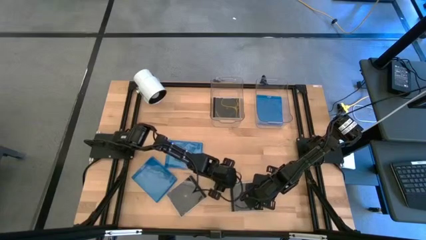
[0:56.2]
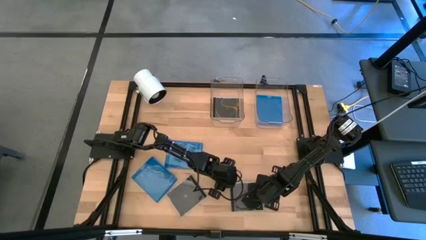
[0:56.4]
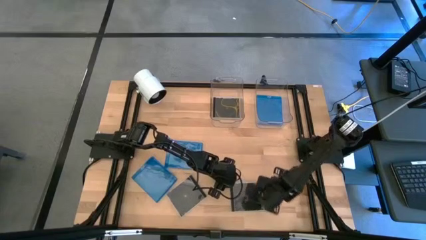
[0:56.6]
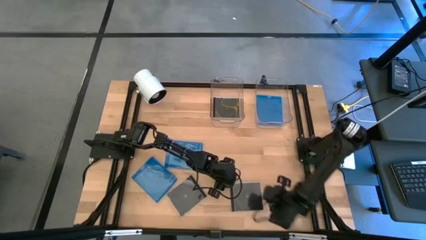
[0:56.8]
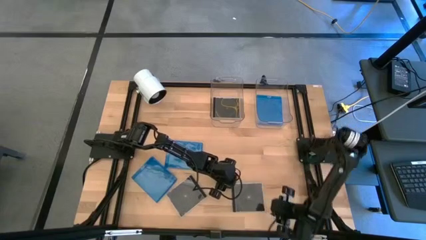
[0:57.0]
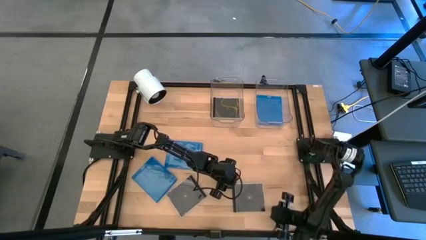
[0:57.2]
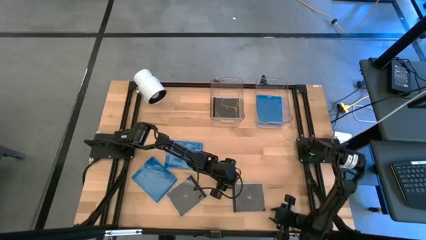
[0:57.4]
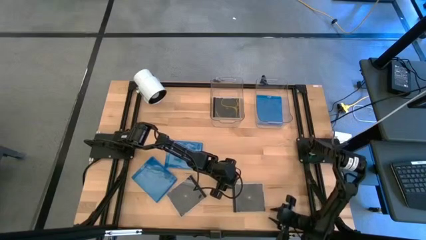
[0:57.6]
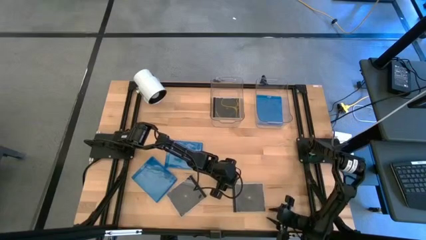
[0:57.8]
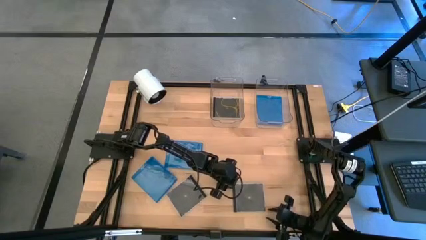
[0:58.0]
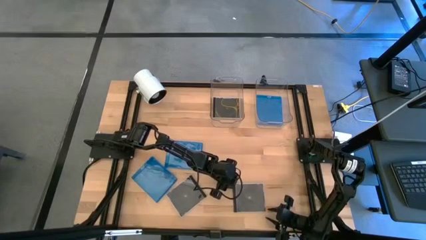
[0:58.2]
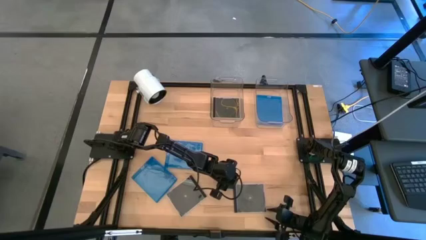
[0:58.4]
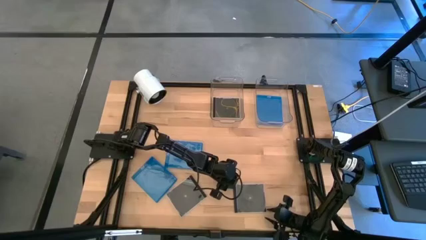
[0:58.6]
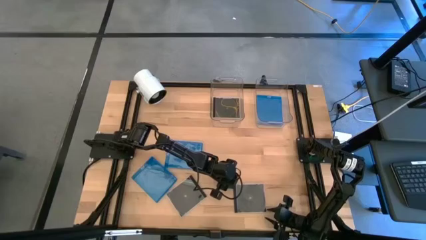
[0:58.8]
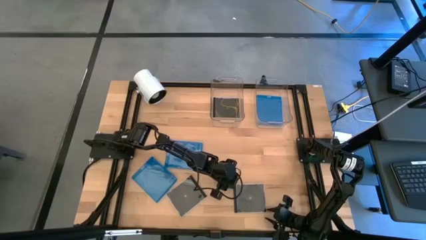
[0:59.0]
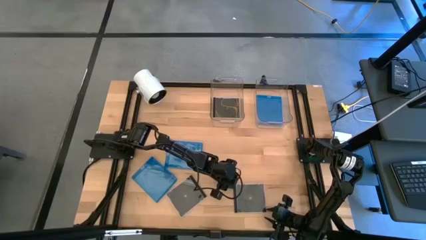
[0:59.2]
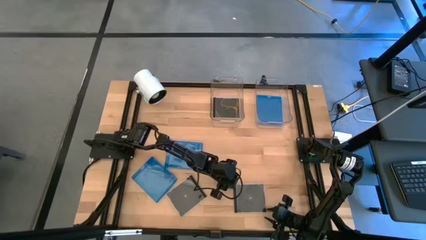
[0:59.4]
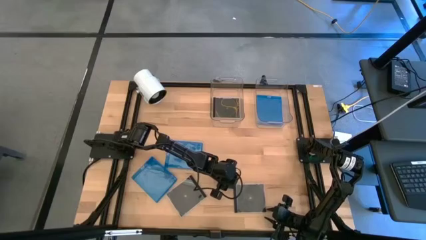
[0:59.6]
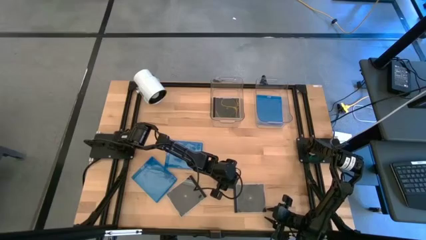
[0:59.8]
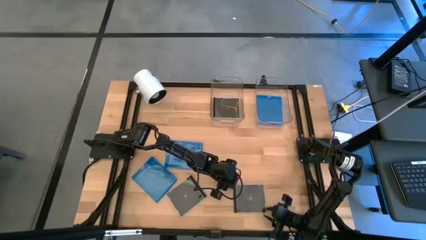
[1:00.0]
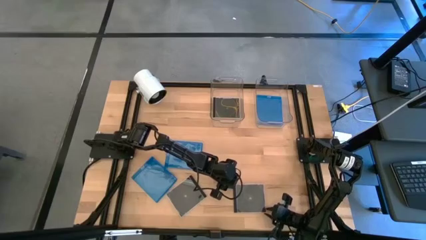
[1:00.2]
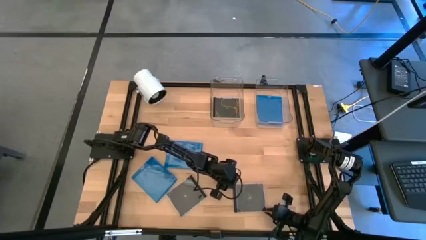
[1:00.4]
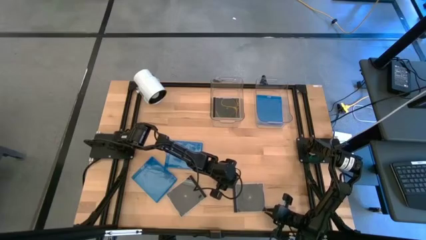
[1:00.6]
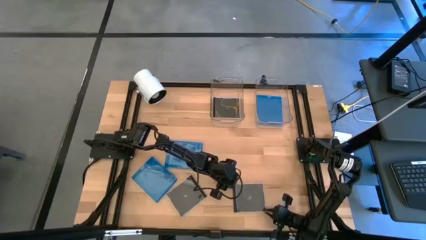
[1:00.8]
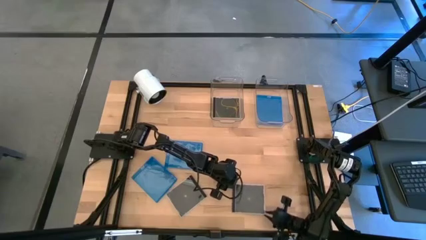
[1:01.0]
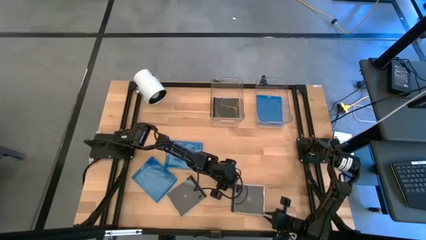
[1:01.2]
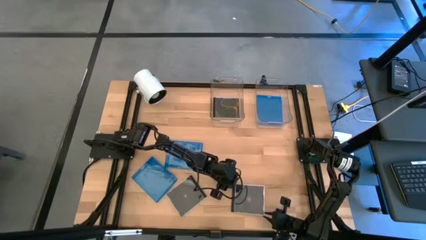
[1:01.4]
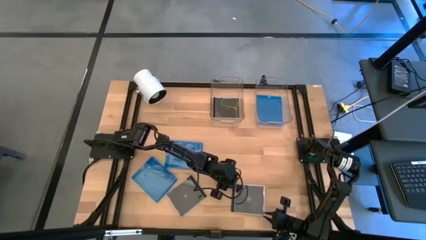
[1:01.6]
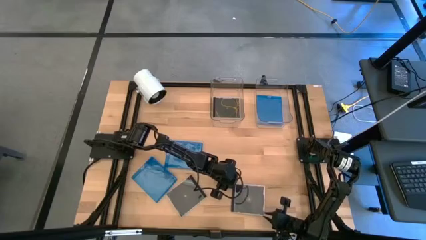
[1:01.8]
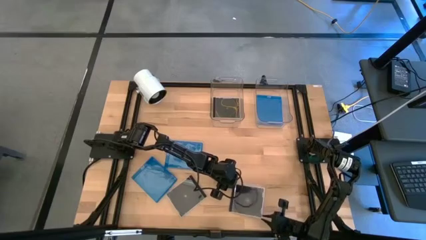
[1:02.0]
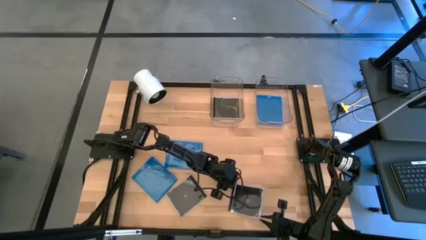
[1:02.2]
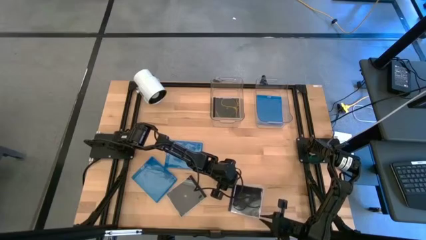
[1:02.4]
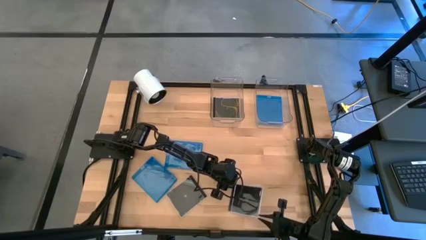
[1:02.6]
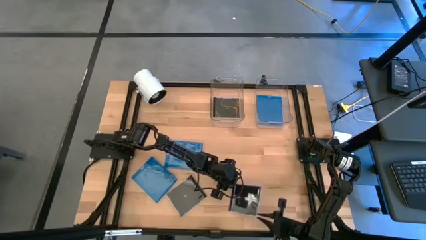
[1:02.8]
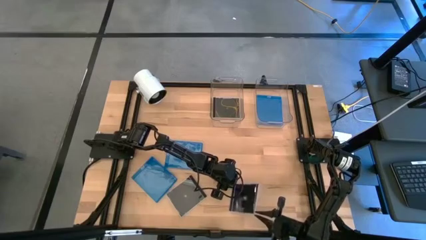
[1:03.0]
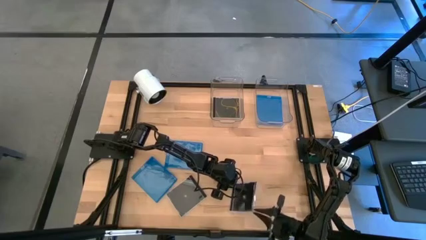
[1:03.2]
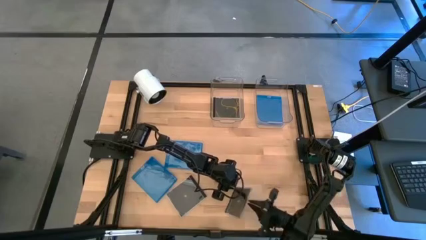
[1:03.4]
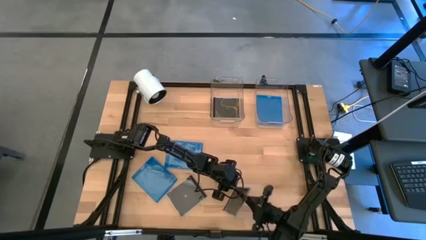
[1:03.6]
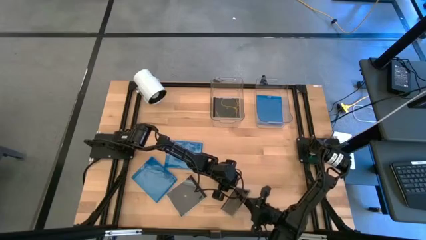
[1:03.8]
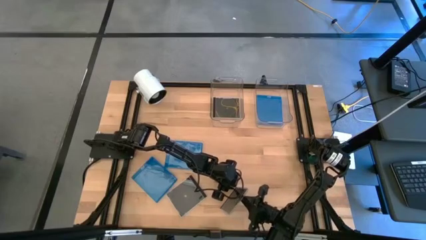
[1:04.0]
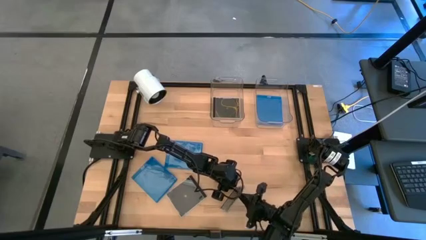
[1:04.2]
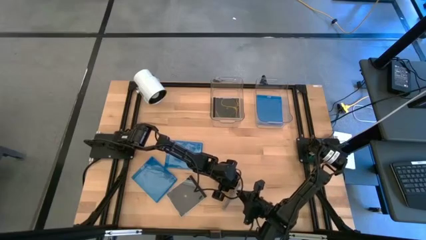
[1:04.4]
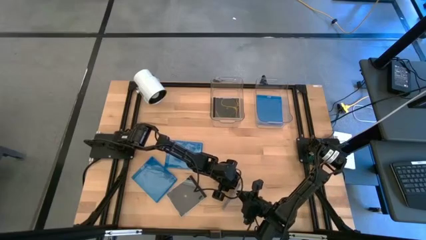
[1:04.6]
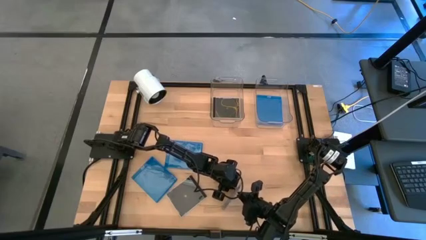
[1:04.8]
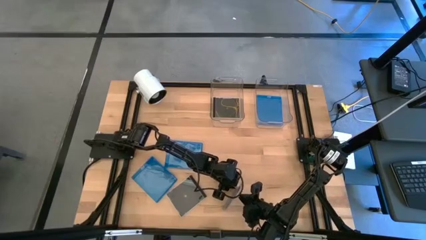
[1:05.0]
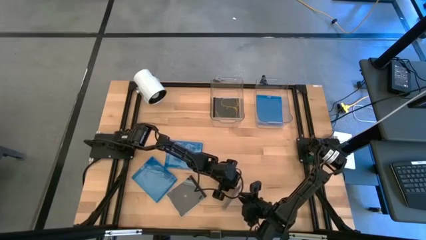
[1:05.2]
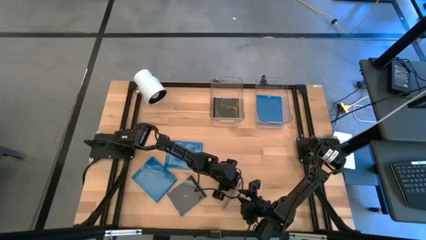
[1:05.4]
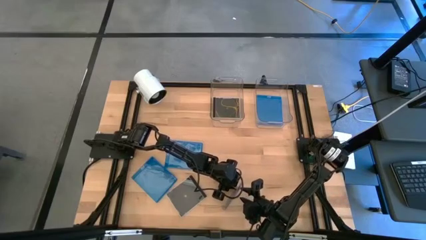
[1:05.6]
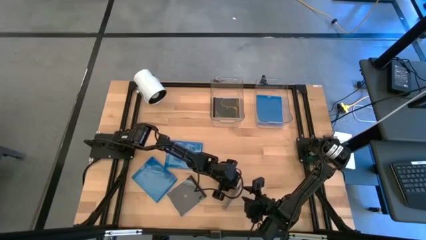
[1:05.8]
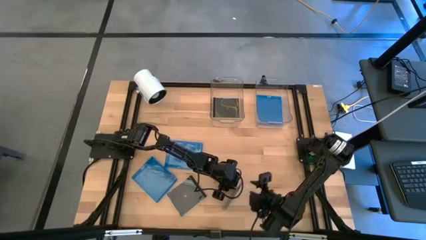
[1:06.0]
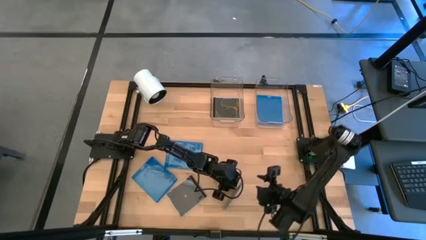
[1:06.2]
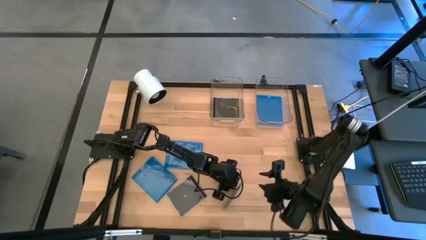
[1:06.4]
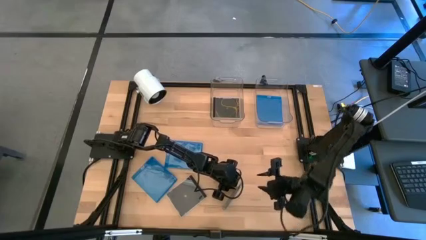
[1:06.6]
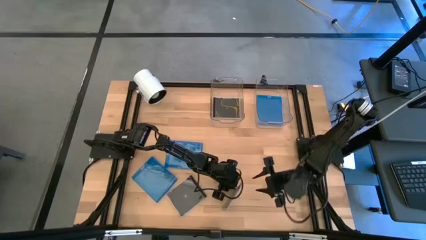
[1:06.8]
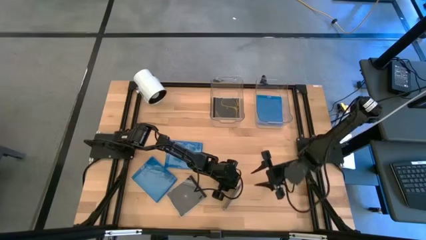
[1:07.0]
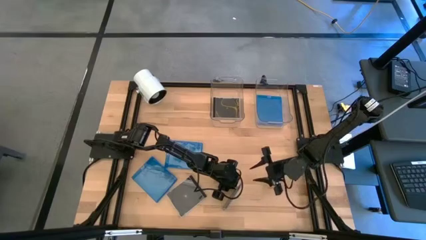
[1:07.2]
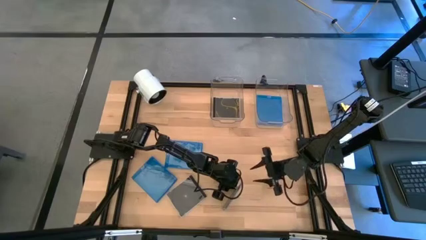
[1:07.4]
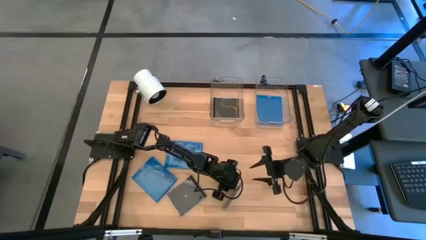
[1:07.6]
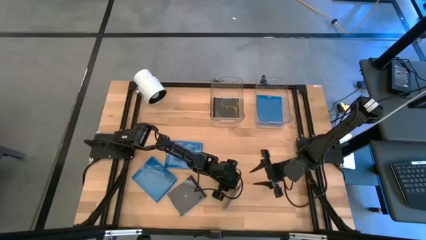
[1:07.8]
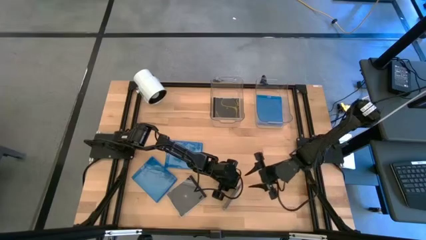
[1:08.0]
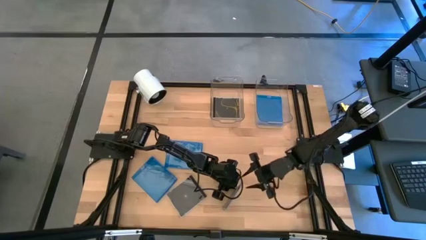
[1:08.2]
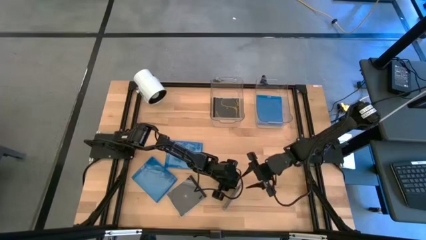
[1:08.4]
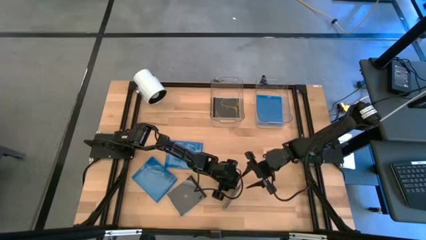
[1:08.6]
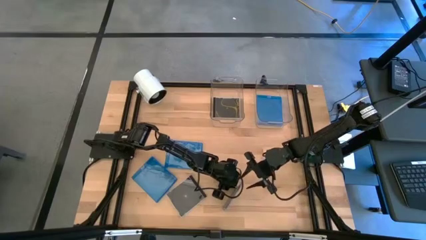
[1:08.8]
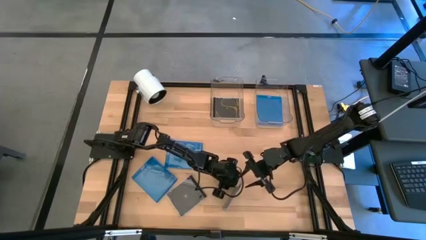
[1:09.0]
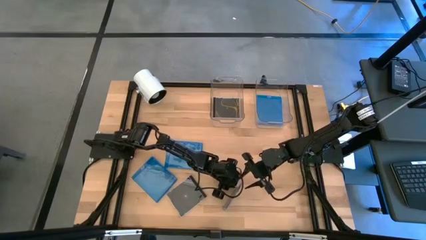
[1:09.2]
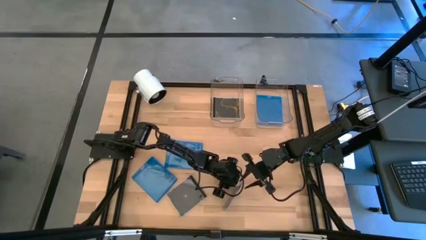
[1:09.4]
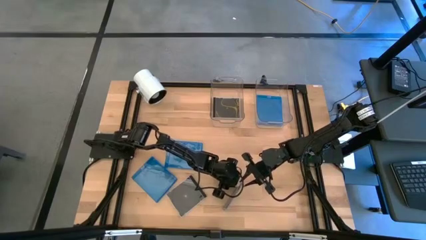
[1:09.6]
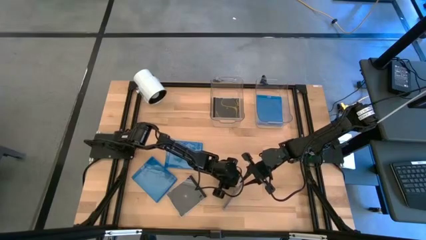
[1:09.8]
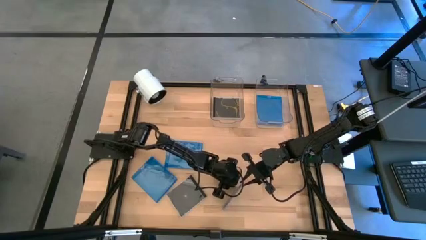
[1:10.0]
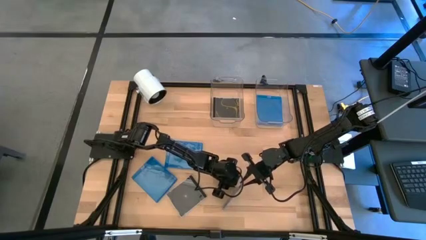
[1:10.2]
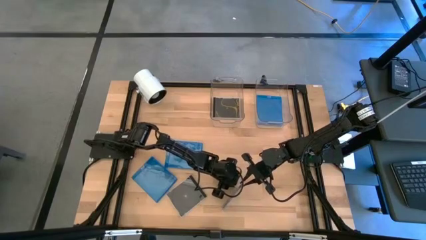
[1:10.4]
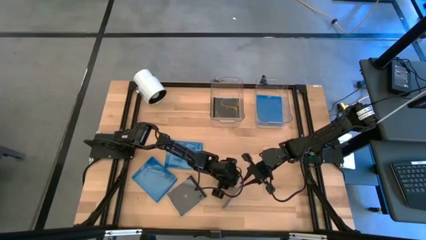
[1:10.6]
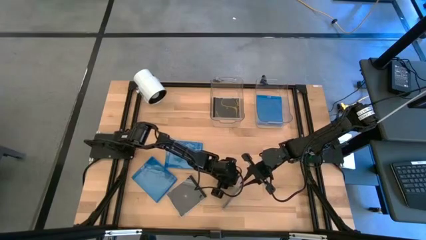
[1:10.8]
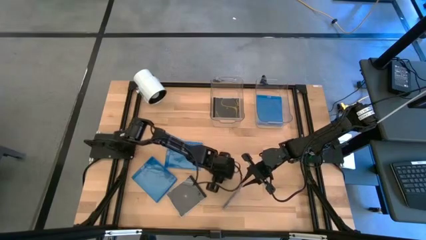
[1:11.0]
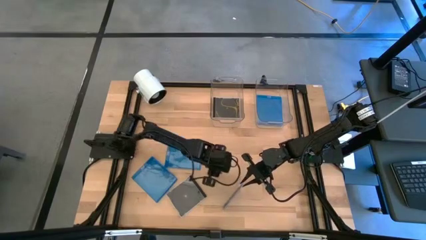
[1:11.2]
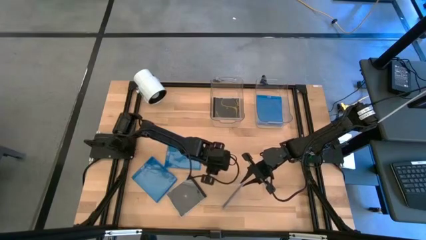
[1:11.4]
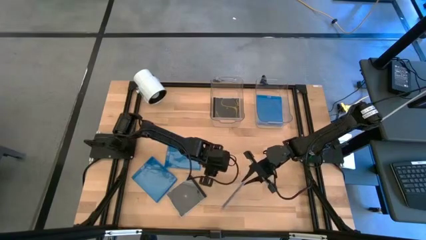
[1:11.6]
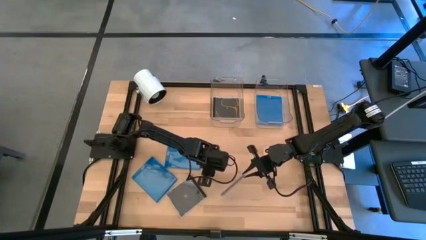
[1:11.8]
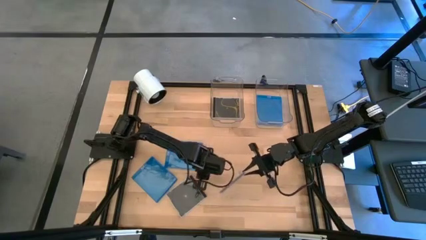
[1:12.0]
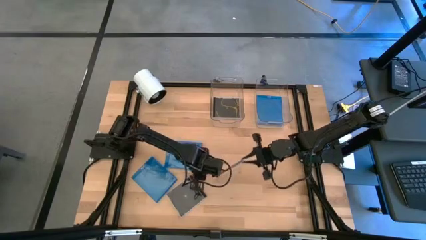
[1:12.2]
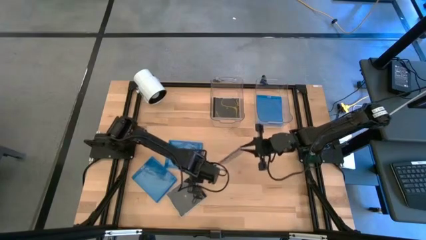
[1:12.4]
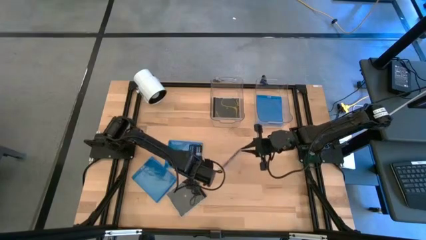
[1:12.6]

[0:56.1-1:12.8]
Task: Pick & place jewel cases by type
Put the right black CD case into the left transparent bin
